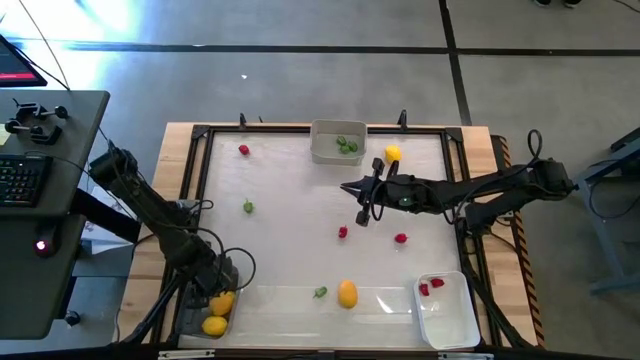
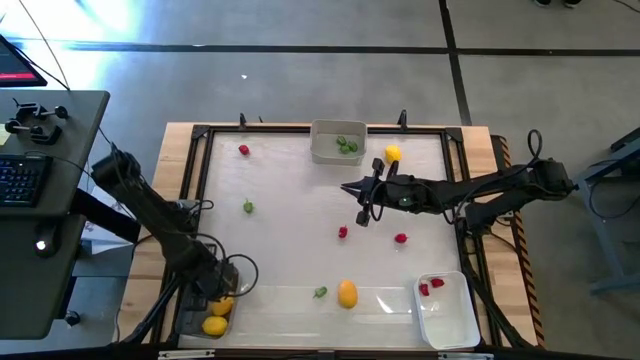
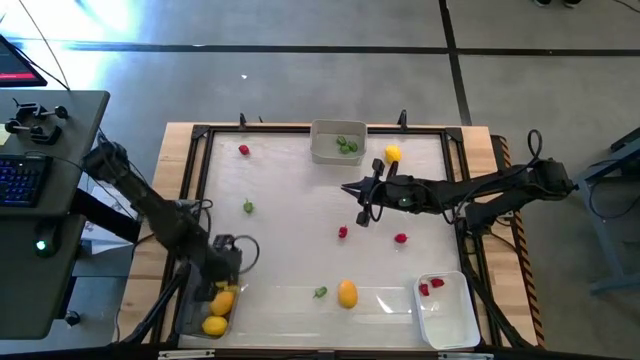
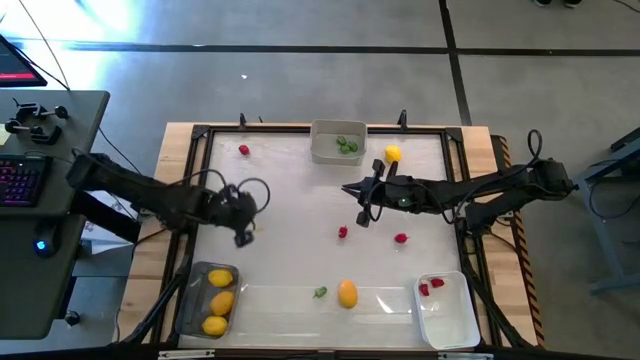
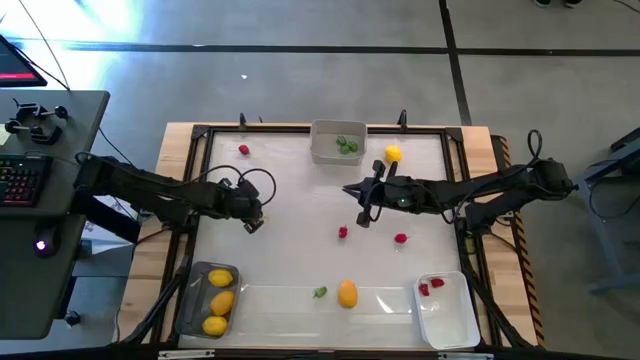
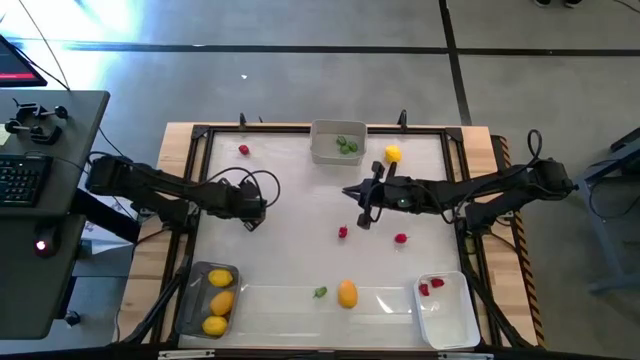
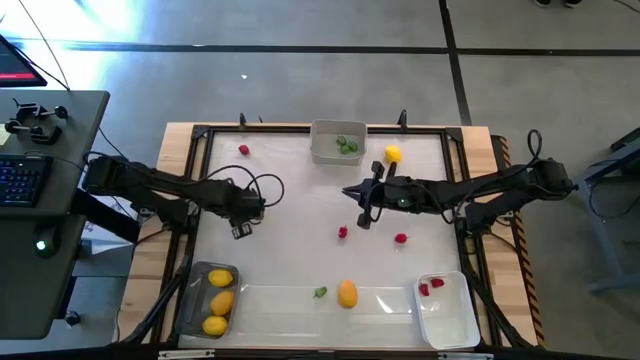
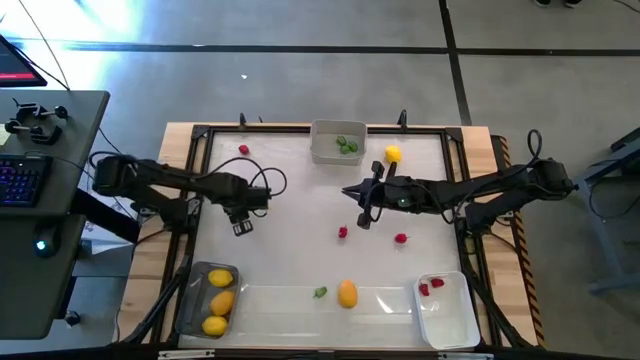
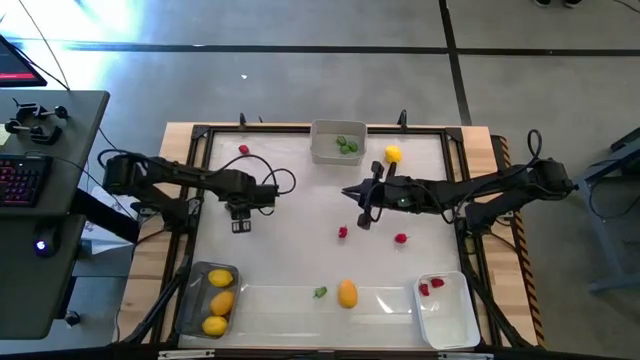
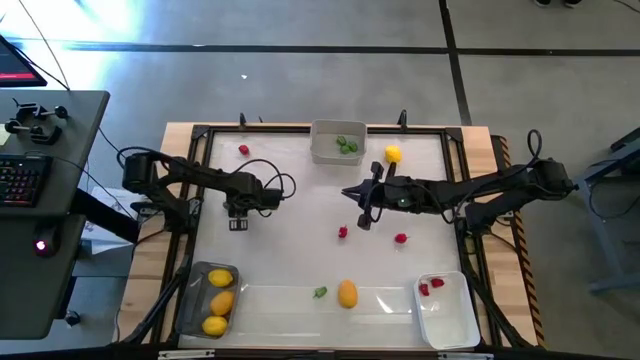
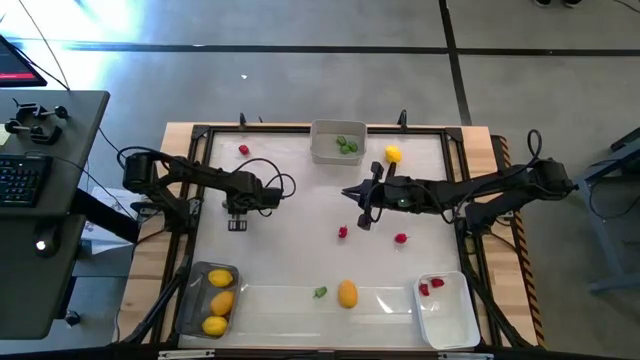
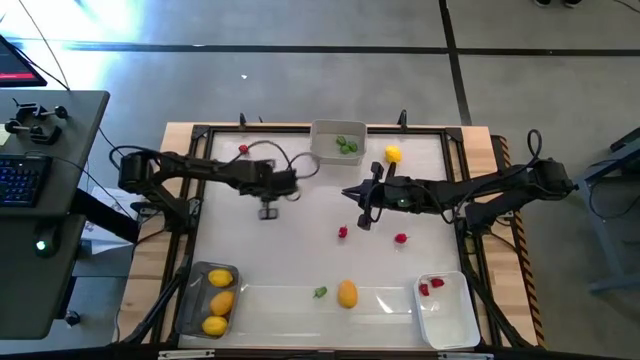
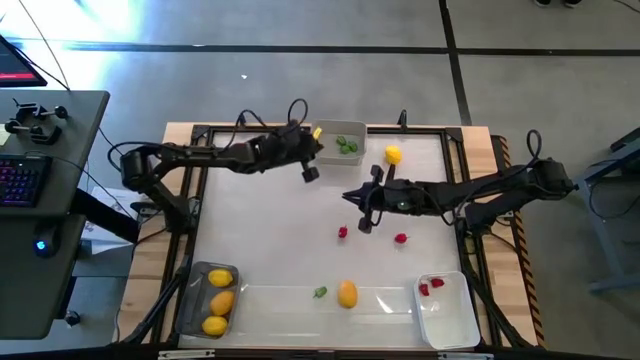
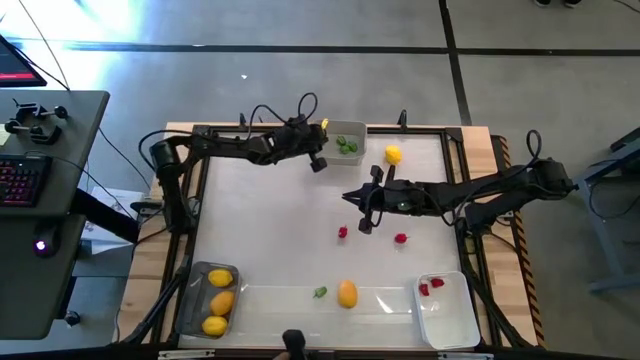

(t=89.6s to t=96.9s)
Task: Sort produce into baskets
Put the green chili pepper into the gray bin

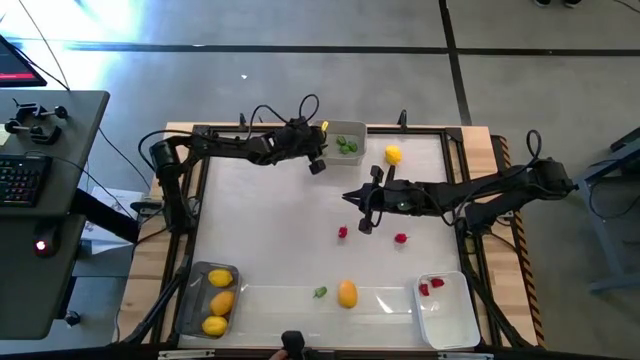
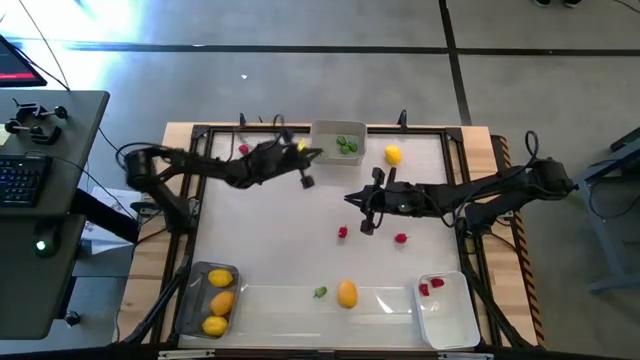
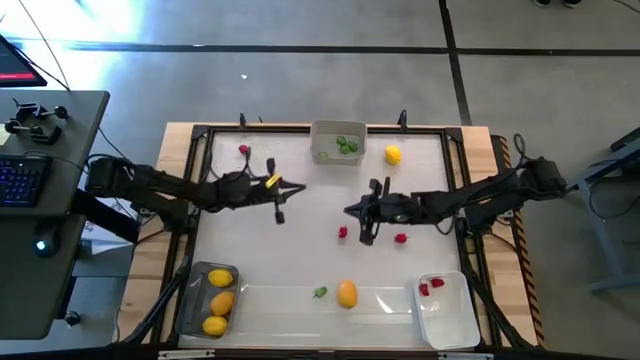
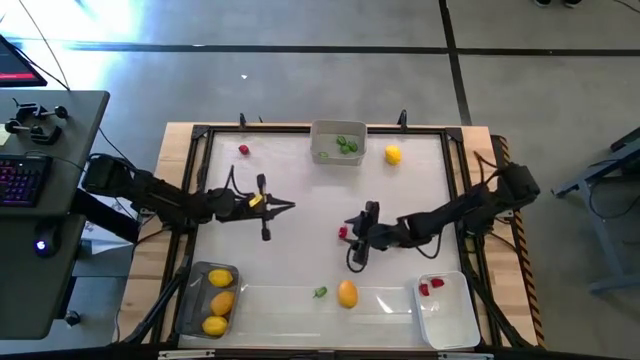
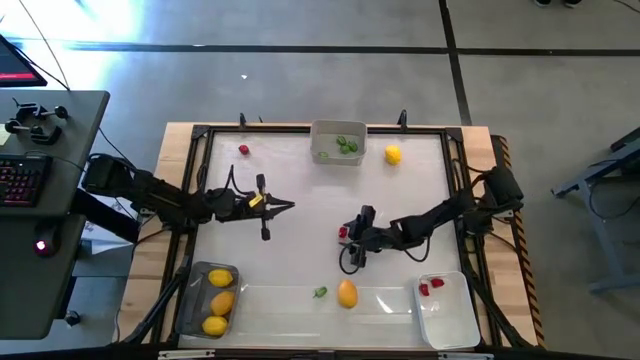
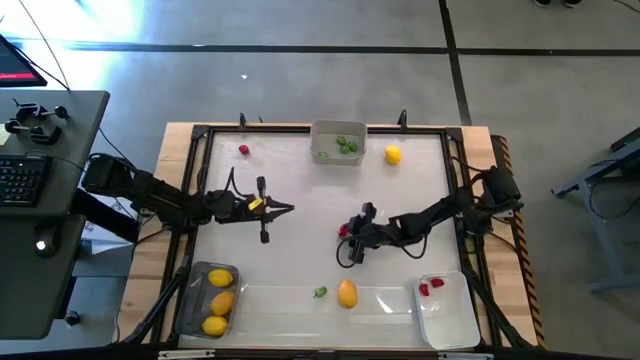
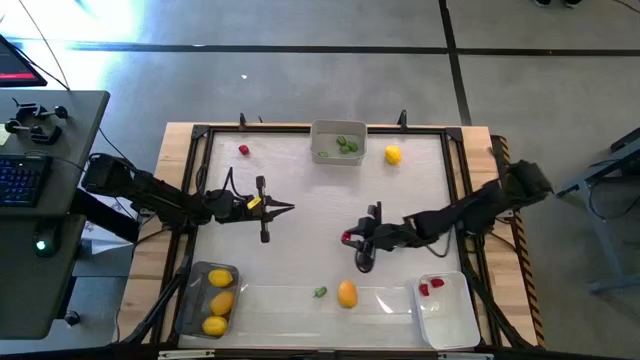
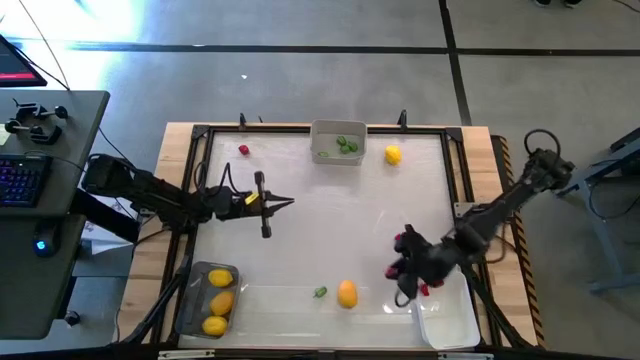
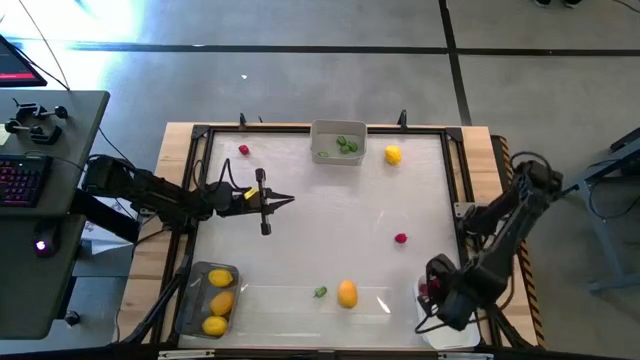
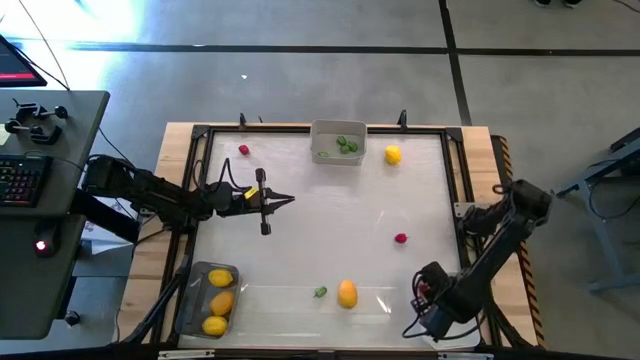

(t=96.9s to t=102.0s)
Put the red chili pepper into the white bin

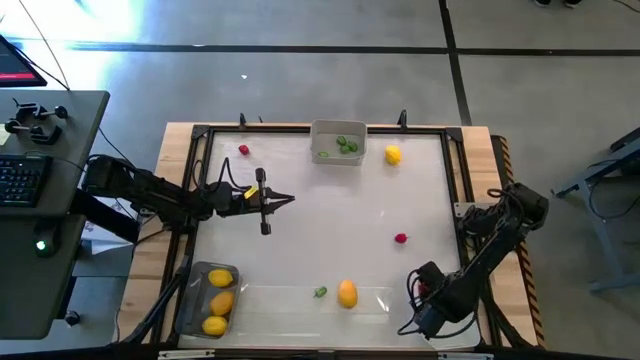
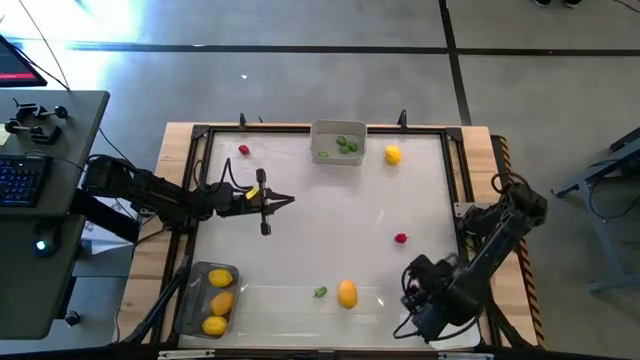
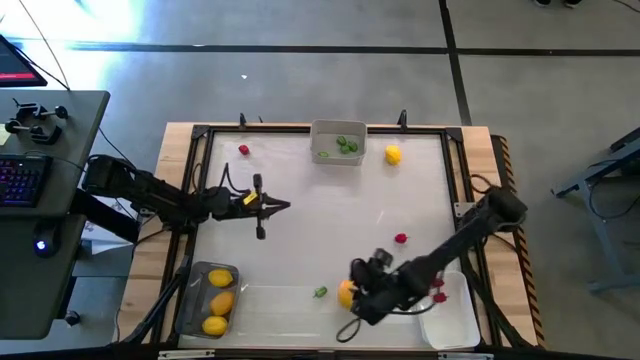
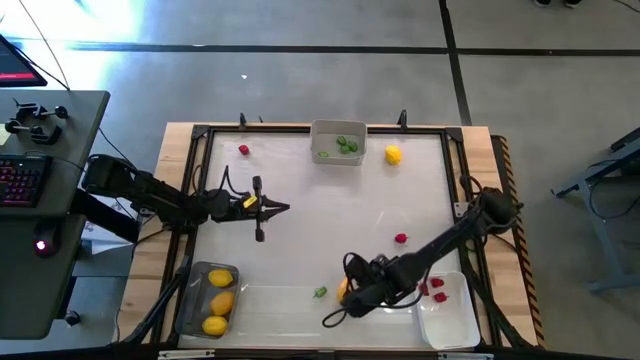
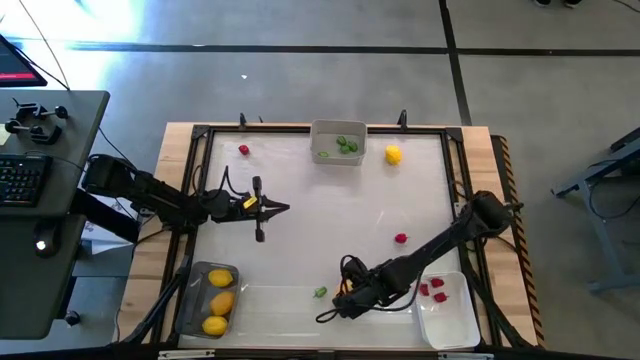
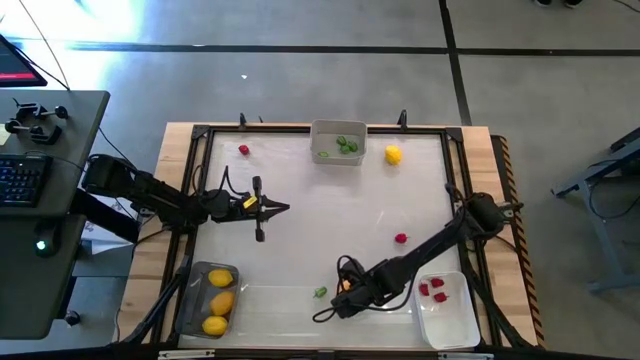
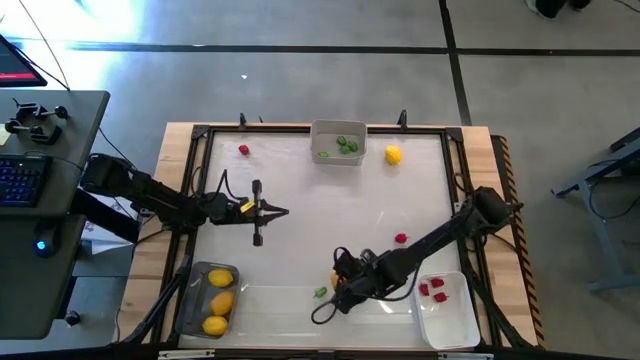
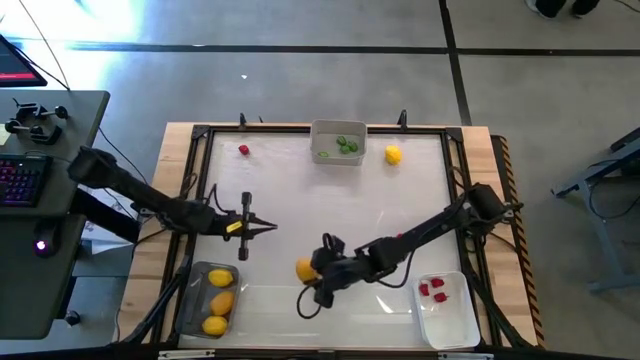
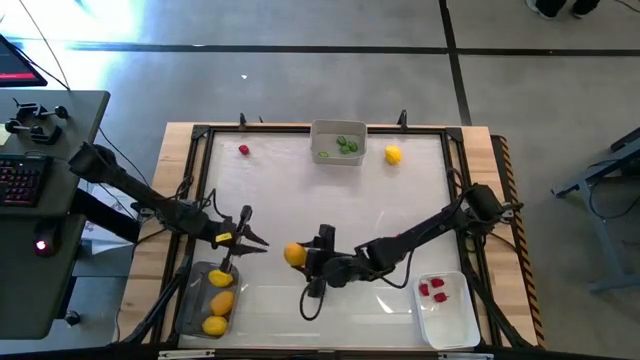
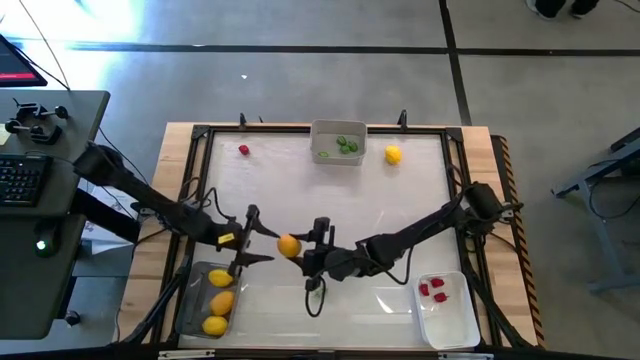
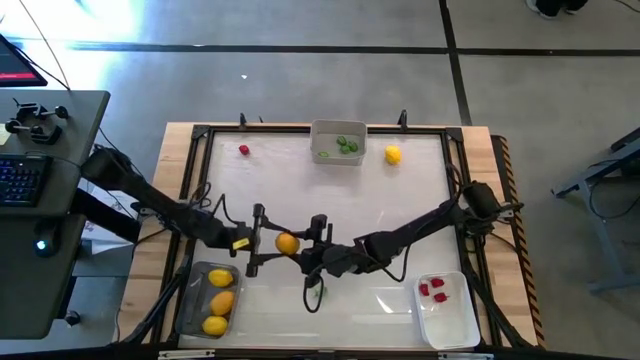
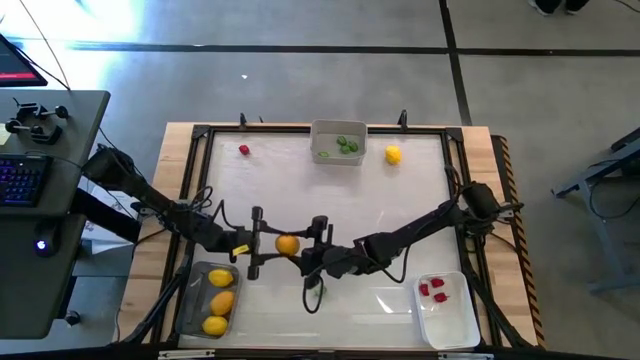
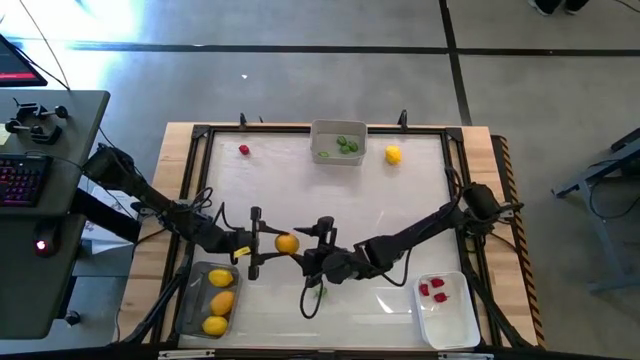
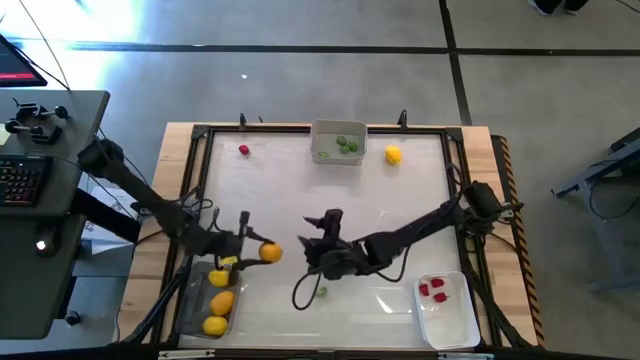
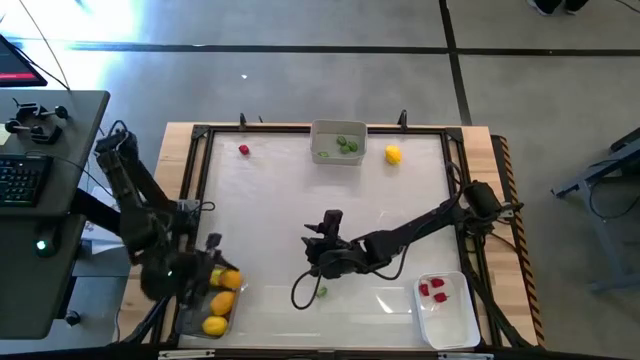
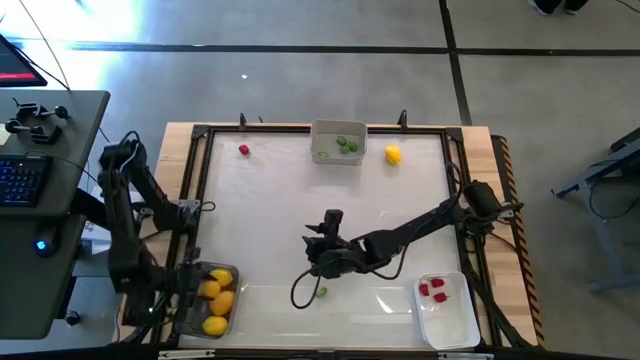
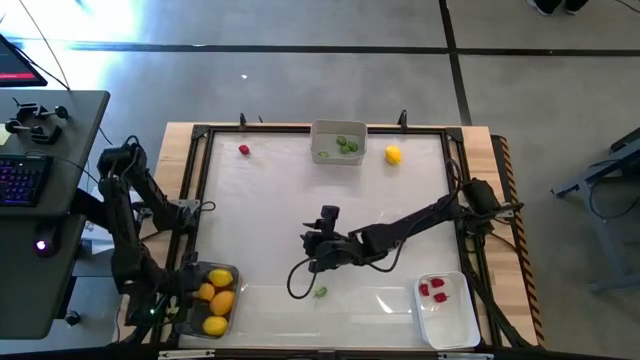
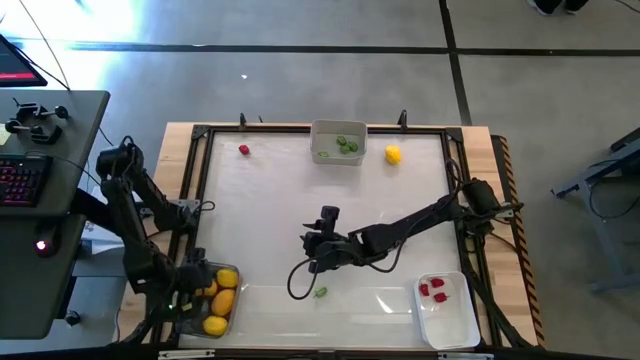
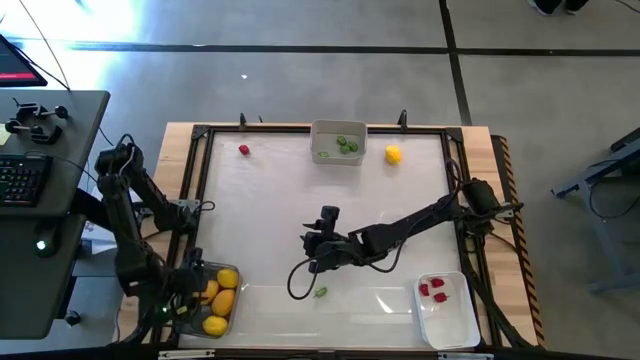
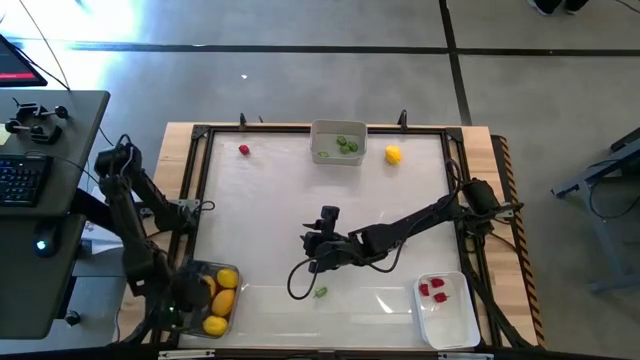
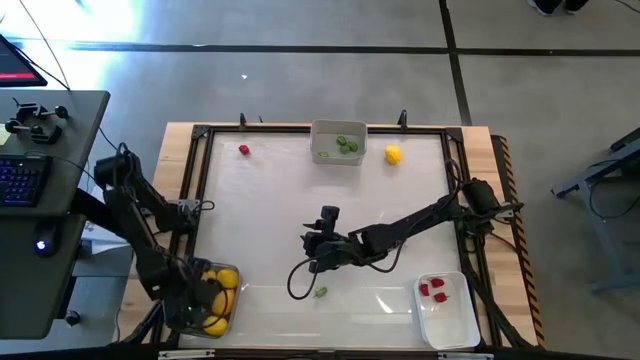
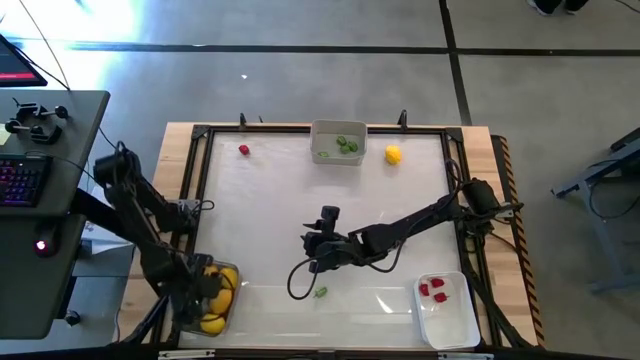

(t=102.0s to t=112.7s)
Put the lemon into the black bin
